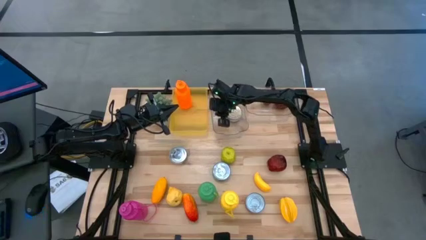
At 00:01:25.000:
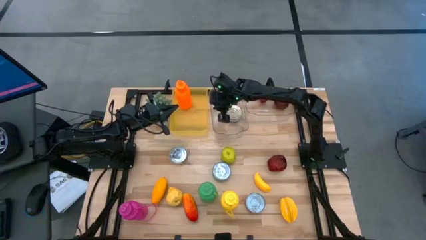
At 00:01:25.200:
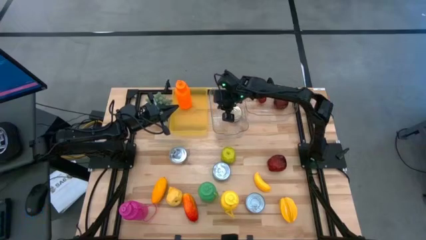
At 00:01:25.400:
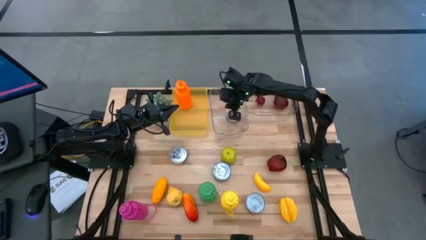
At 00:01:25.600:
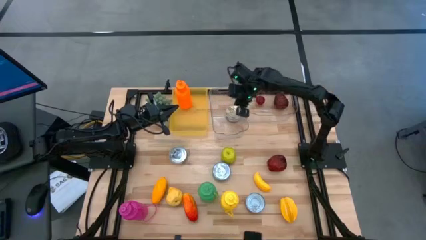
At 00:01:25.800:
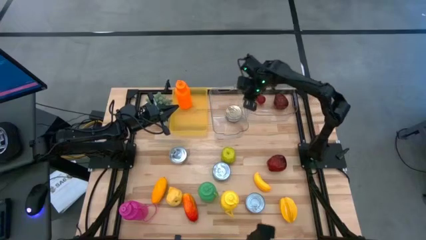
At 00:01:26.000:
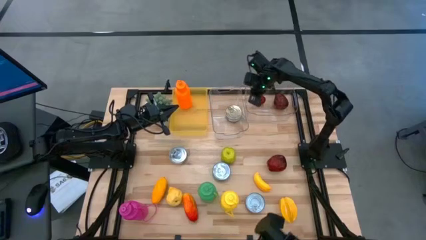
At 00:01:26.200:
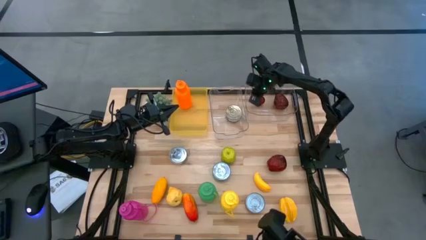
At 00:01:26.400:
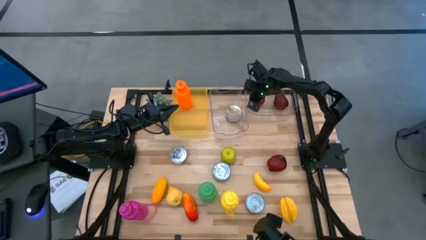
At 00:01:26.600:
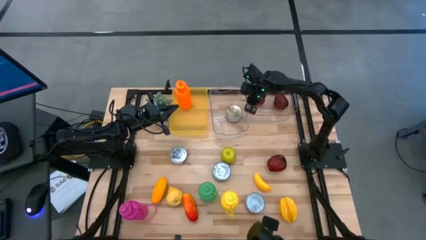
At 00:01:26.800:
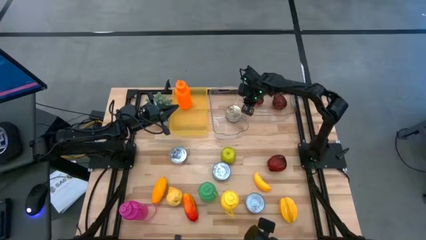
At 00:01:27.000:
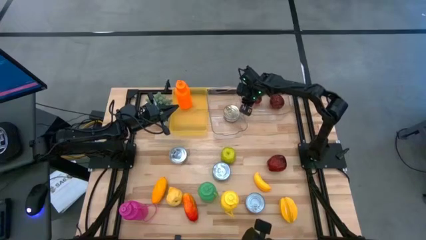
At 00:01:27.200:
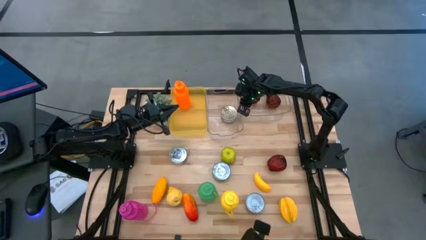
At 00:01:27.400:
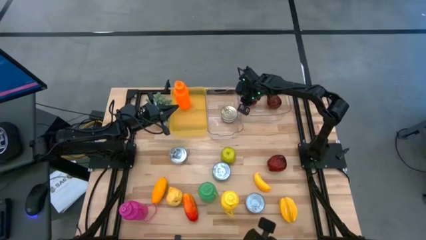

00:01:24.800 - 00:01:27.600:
Task: Pick & Place Food Item
Adjust the right transparent bin

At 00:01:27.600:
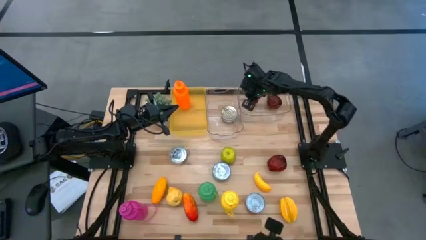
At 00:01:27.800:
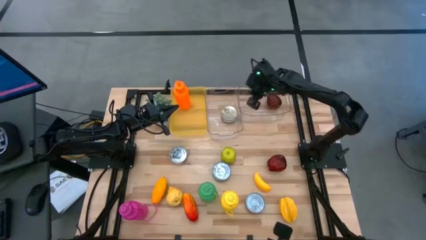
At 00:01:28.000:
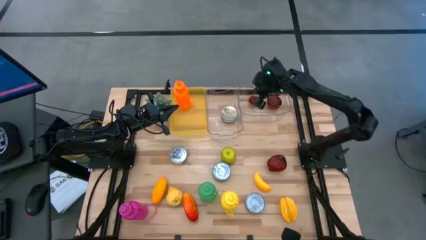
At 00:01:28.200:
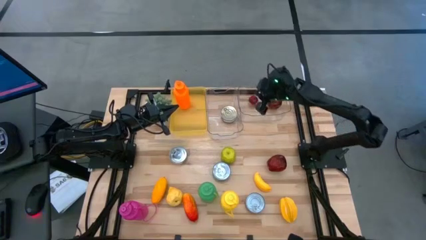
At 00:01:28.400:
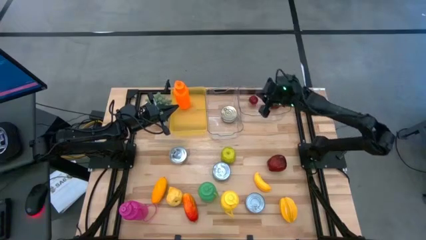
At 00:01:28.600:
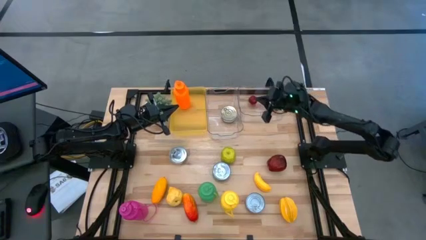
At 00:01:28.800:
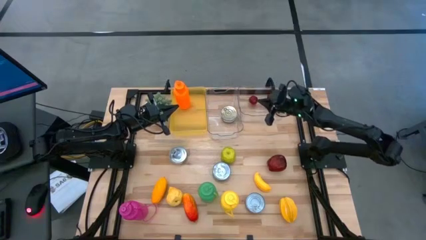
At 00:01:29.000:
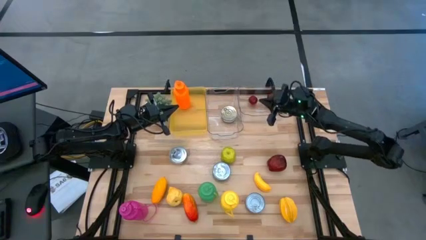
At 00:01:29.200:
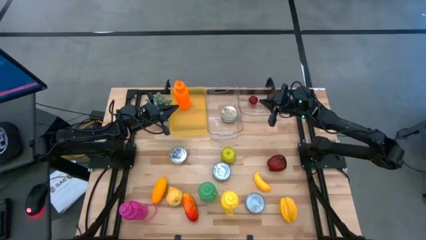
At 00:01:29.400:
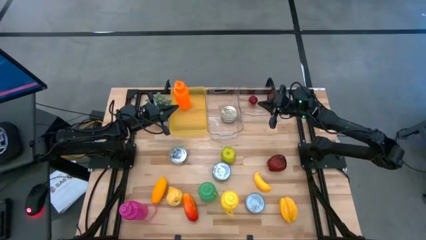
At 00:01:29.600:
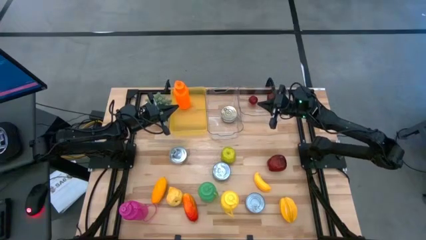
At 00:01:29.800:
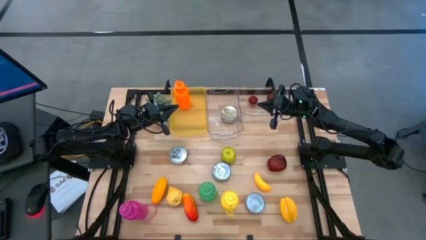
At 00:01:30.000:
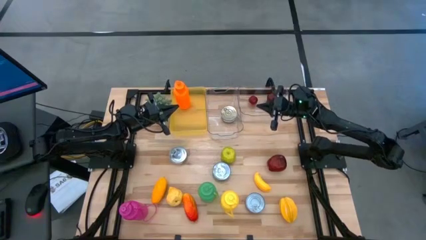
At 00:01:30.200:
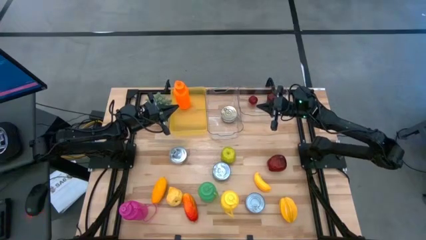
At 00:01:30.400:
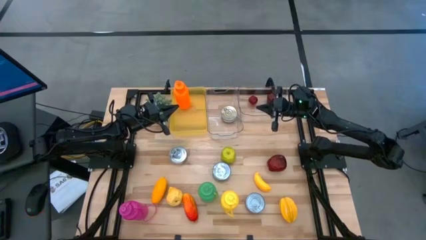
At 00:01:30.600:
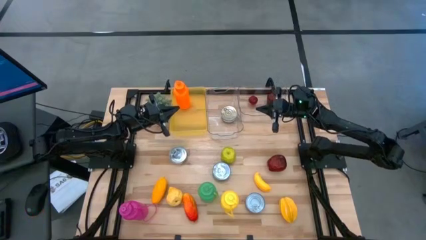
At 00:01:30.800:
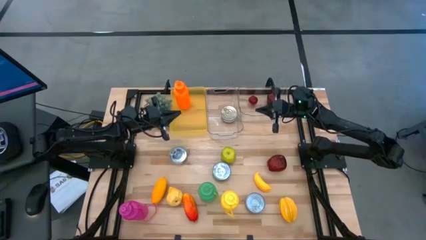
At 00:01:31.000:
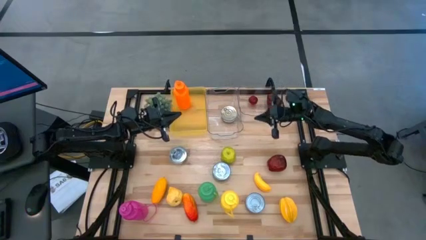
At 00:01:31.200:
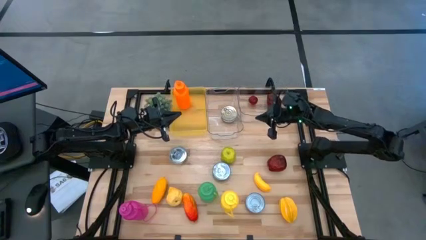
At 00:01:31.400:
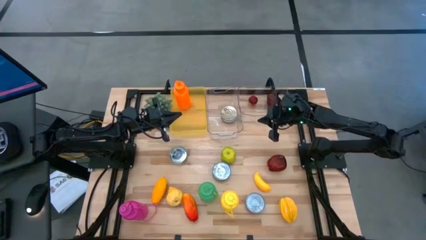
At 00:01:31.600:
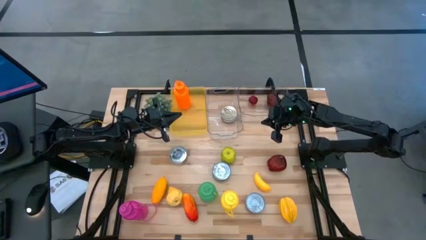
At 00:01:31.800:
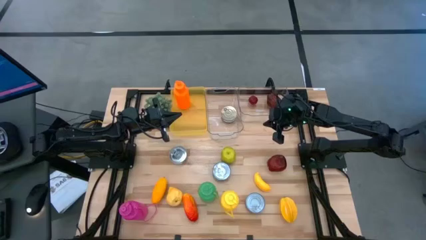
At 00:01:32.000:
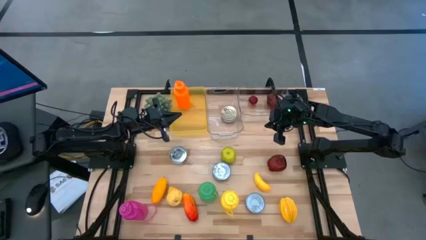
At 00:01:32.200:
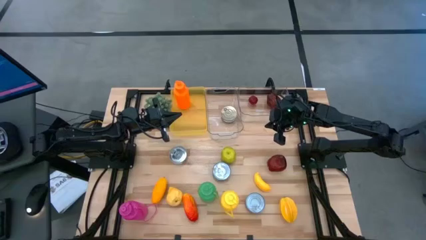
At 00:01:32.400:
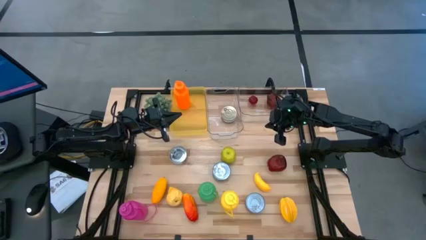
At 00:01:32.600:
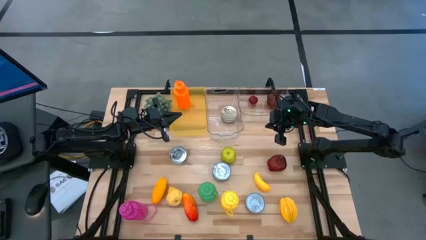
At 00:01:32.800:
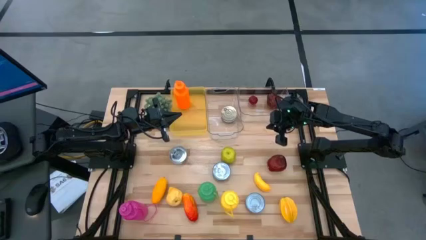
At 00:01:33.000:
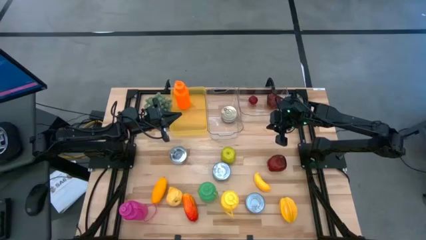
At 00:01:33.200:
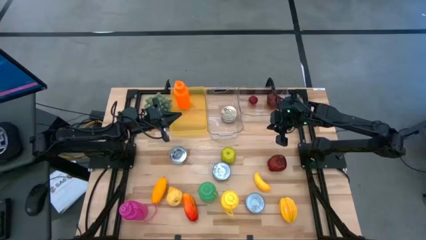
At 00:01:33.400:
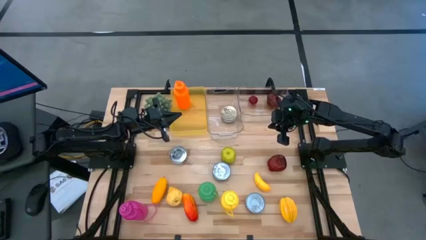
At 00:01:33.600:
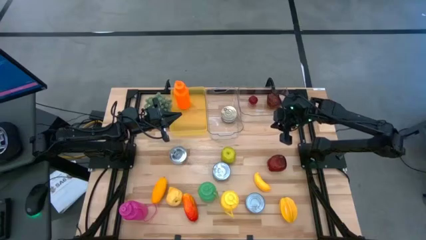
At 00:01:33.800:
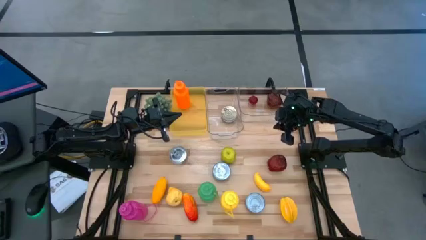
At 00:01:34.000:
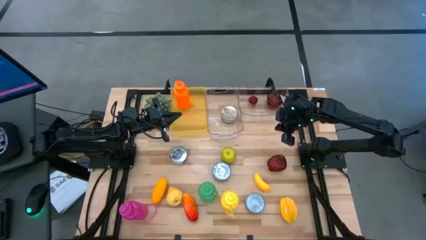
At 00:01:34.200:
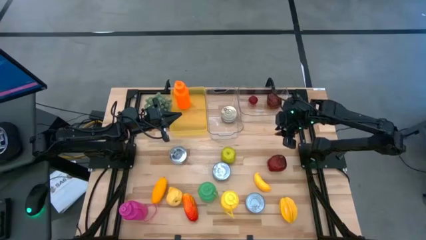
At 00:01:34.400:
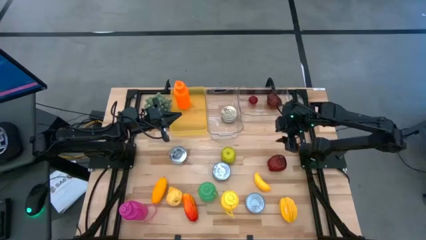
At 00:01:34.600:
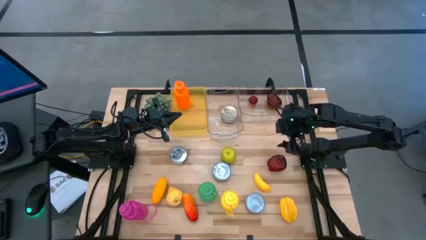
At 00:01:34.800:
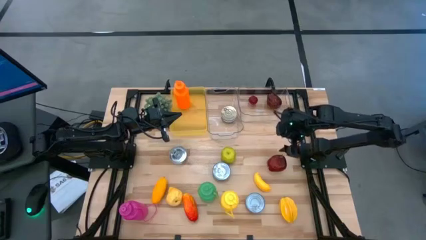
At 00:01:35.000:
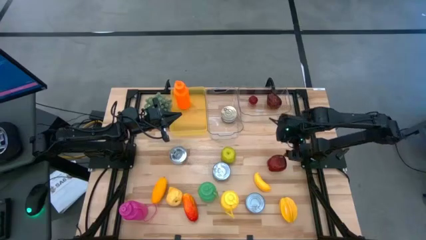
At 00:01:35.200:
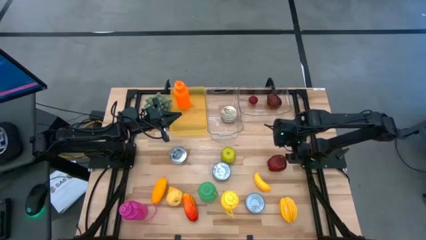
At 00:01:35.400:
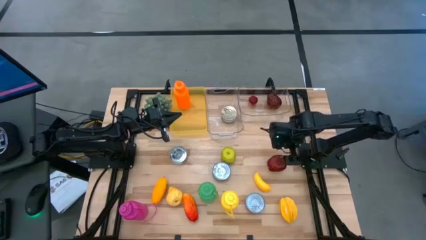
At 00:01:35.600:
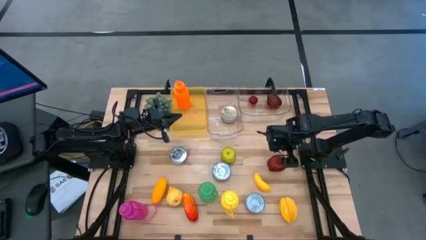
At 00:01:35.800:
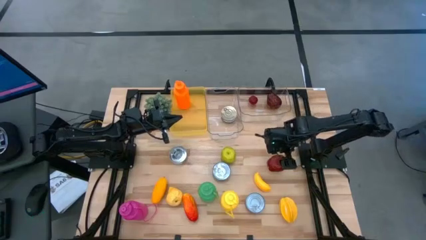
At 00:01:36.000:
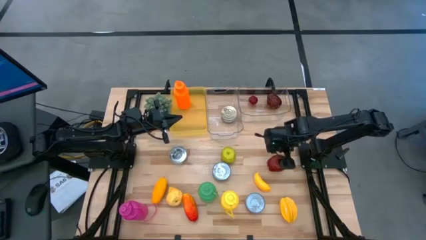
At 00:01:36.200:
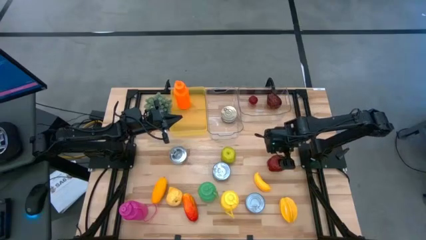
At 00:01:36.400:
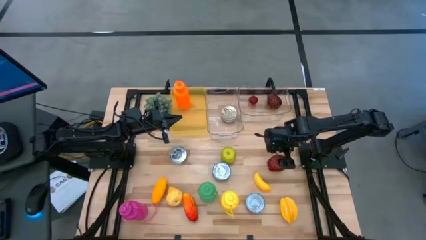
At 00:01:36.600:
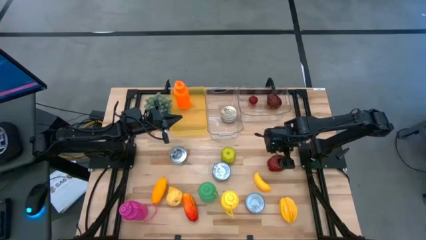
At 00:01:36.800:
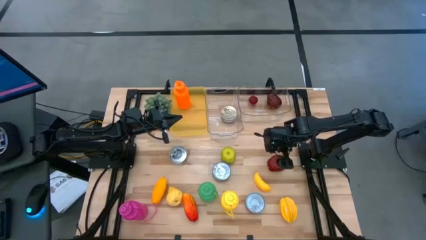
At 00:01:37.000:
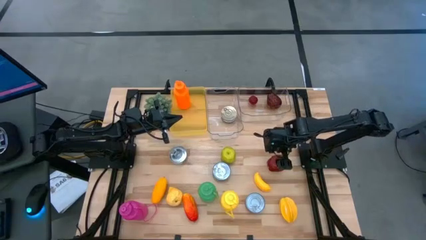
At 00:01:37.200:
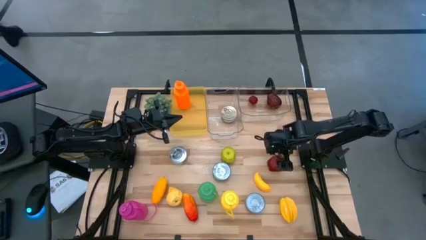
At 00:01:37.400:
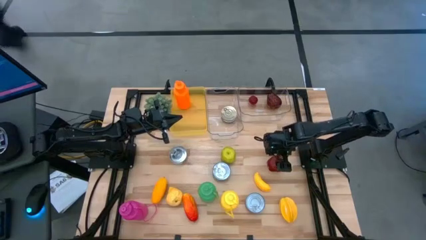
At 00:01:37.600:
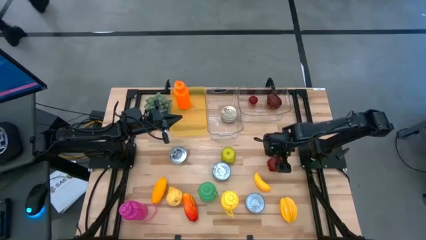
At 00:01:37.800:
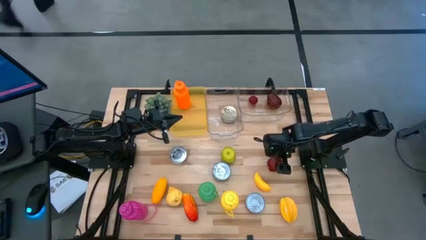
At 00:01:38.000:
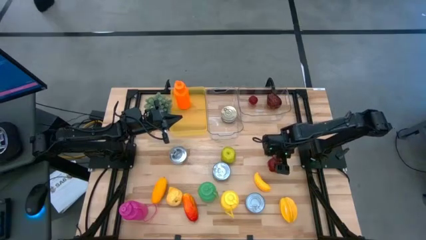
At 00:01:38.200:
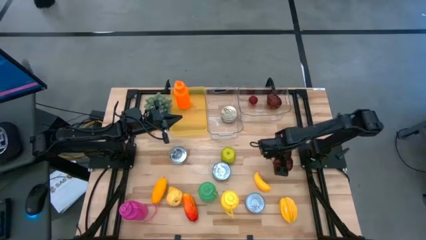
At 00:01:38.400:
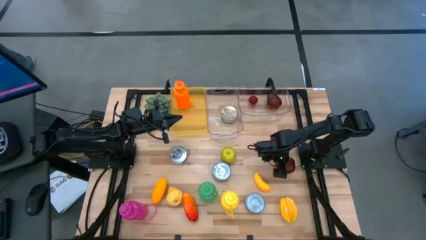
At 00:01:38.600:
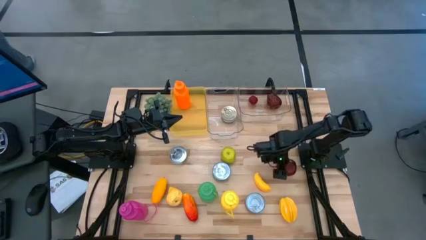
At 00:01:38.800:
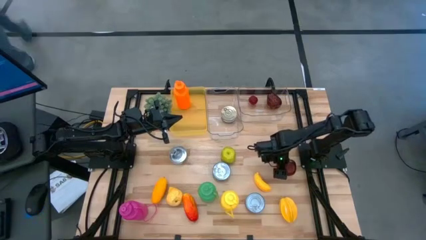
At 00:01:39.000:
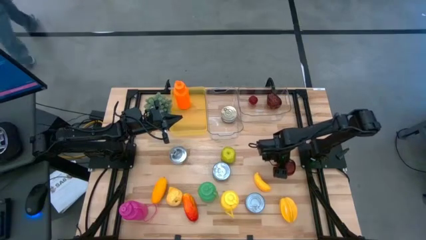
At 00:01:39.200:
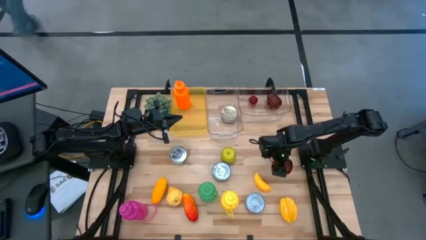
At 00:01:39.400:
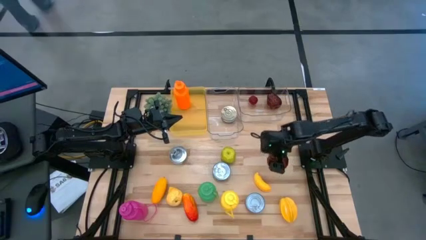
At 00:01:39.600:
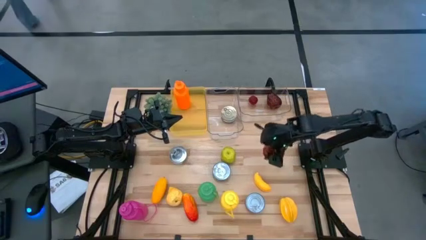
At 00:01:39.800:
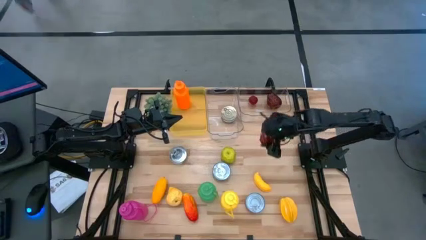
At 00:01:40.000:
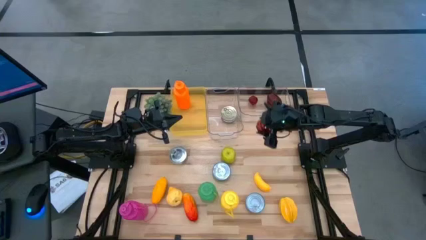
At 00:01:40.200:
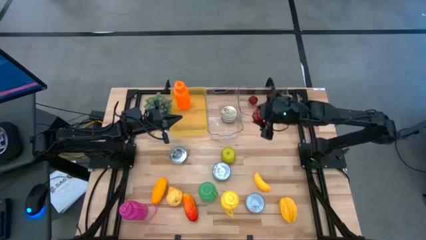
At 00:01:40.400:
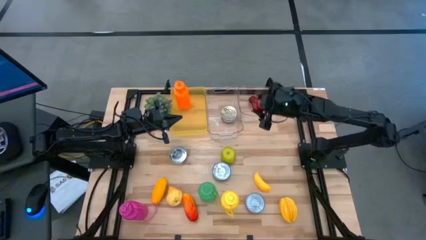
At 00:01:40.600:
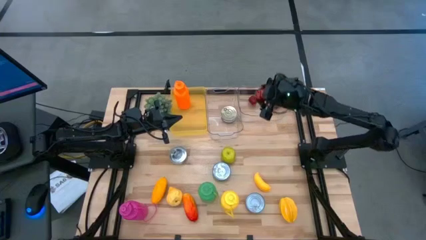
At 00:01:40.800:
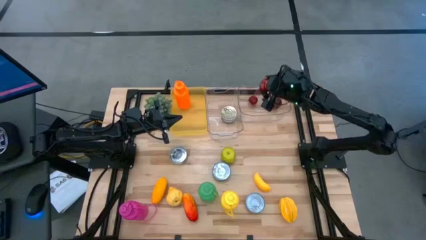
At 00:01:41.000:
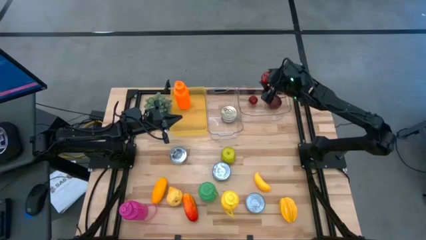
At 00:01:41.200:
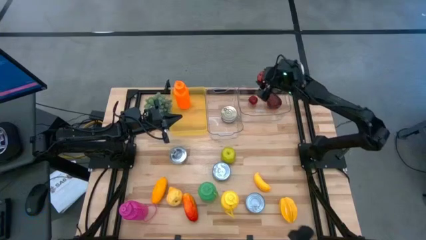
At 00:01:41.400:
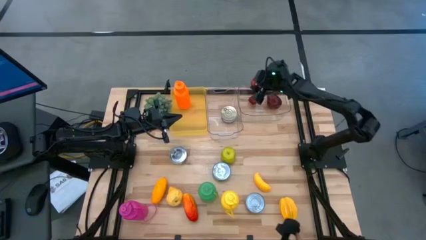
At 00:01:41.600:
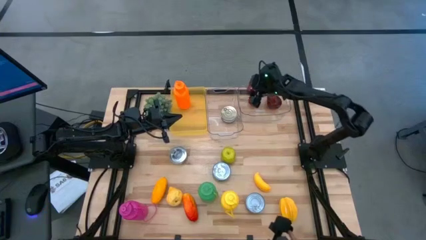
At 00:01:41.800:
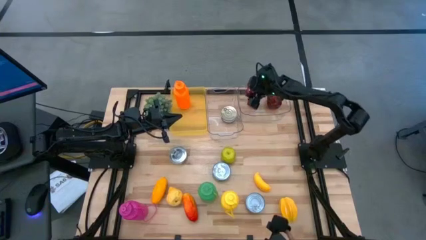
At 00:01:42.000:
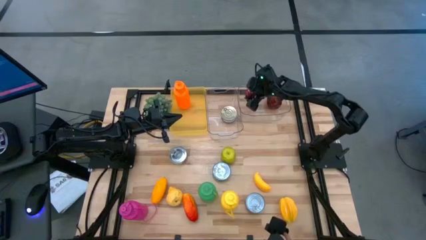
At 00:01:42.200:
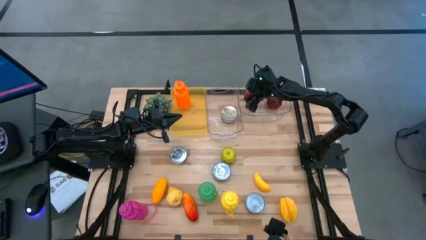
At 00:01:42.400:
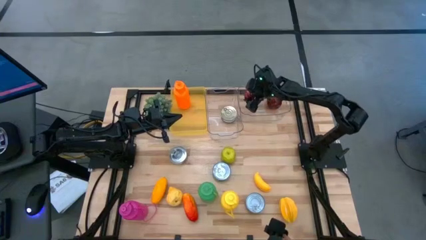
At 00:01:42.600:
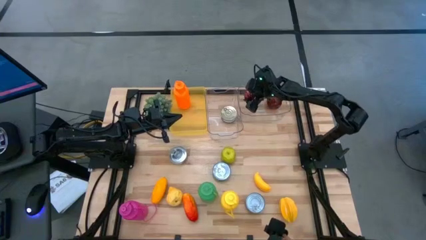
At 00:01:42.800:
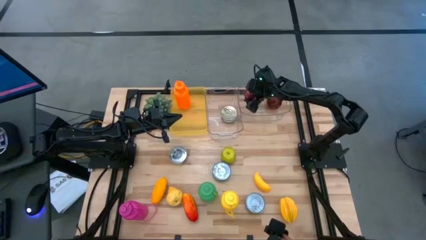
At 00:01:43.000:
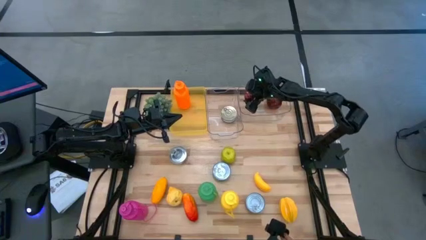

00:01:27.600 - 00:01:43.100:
Put the red apple into the right transparent bin
